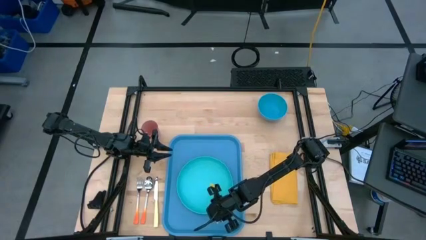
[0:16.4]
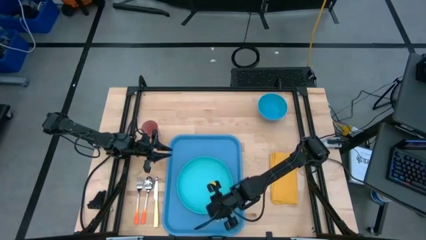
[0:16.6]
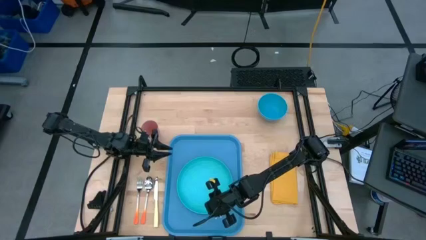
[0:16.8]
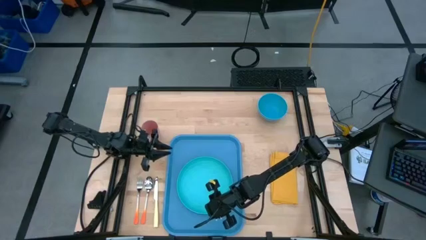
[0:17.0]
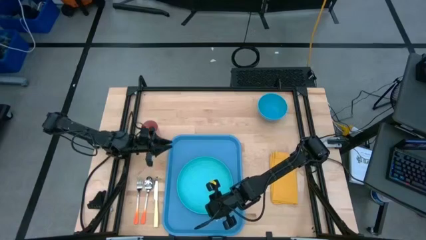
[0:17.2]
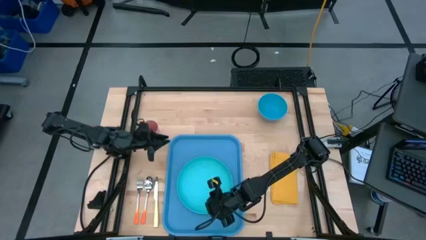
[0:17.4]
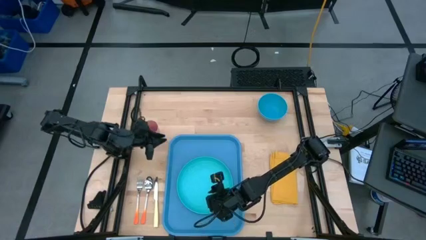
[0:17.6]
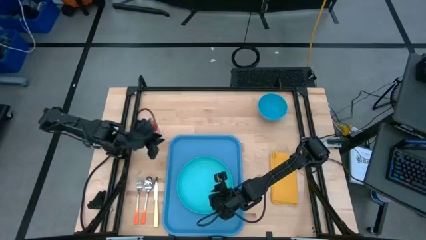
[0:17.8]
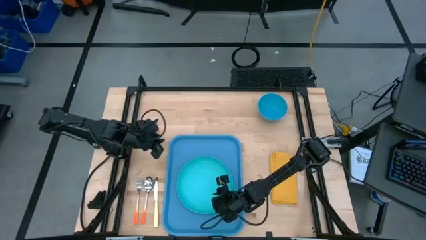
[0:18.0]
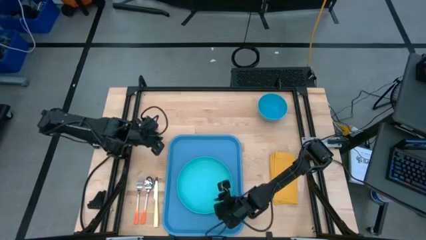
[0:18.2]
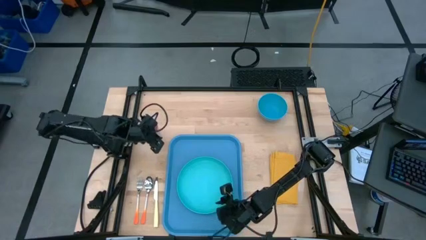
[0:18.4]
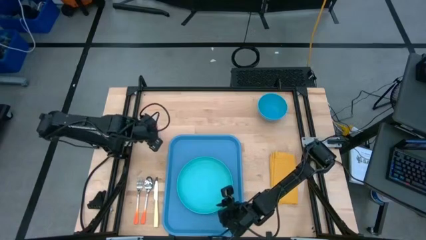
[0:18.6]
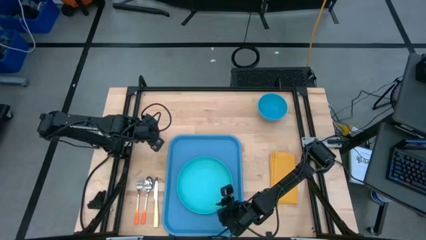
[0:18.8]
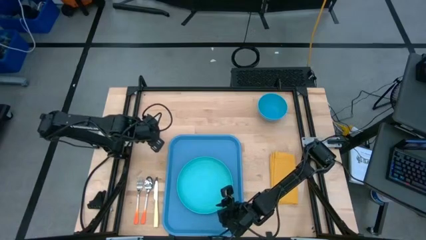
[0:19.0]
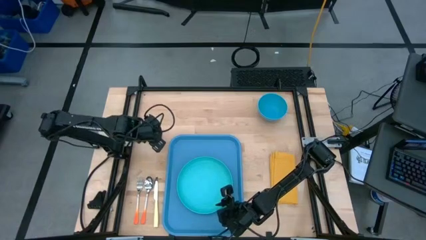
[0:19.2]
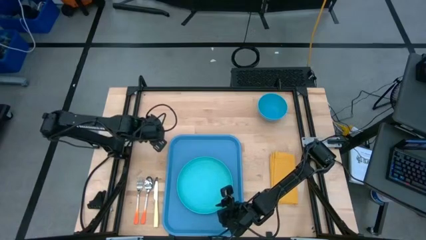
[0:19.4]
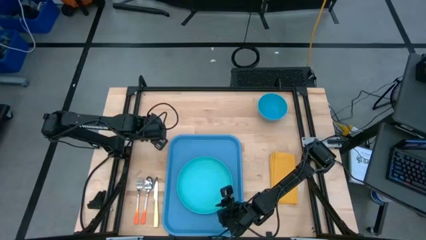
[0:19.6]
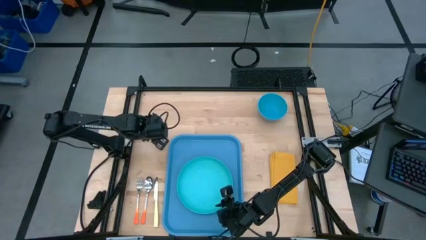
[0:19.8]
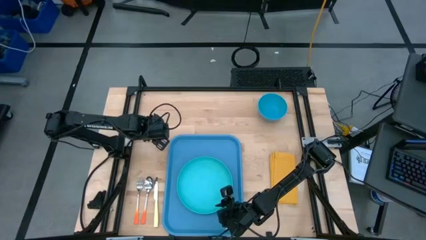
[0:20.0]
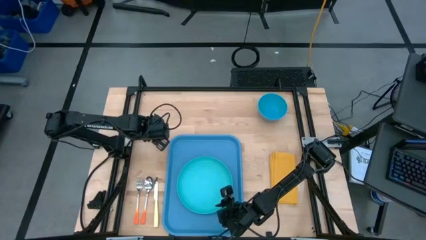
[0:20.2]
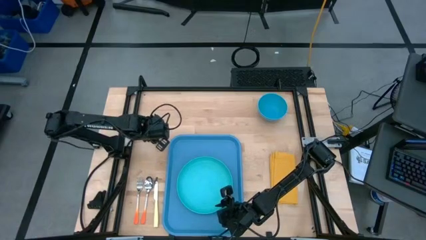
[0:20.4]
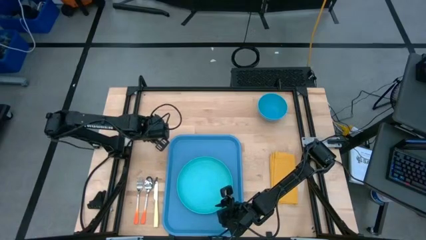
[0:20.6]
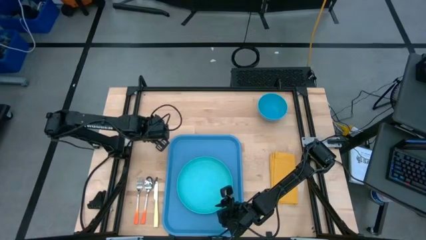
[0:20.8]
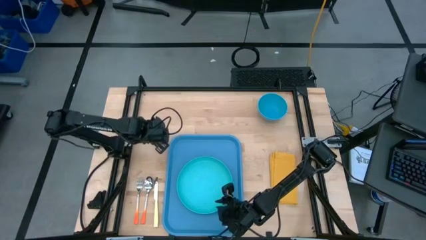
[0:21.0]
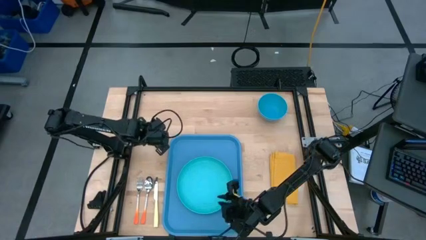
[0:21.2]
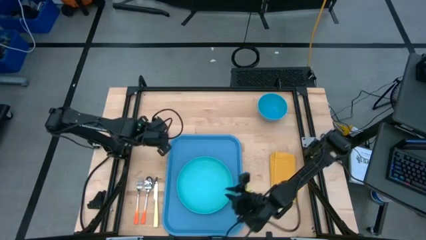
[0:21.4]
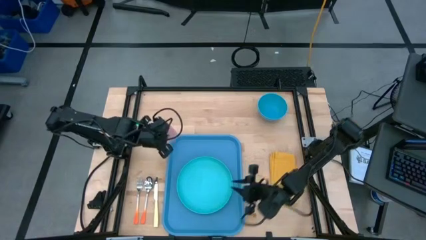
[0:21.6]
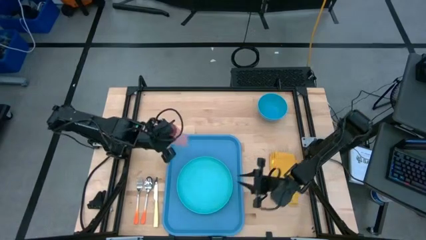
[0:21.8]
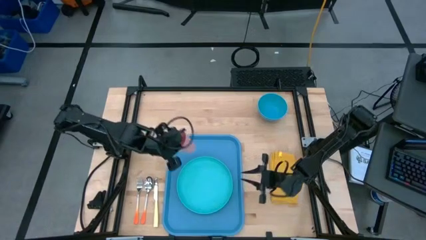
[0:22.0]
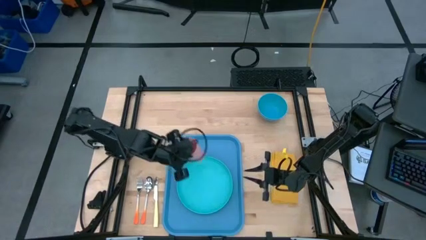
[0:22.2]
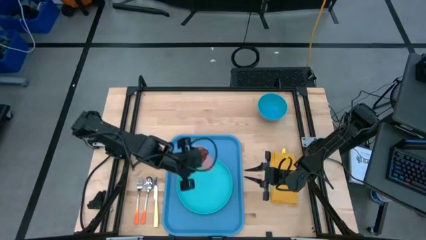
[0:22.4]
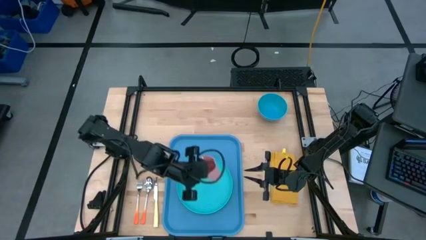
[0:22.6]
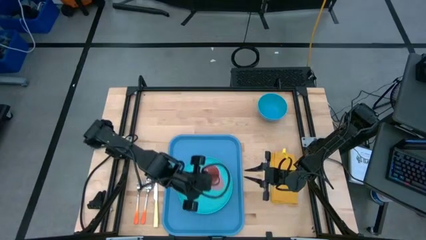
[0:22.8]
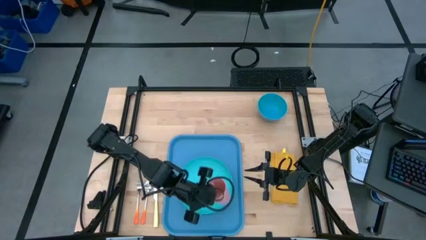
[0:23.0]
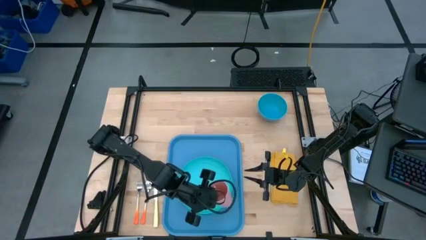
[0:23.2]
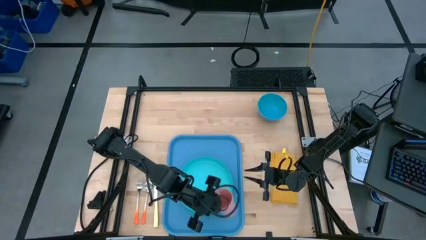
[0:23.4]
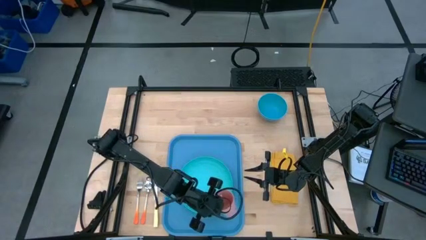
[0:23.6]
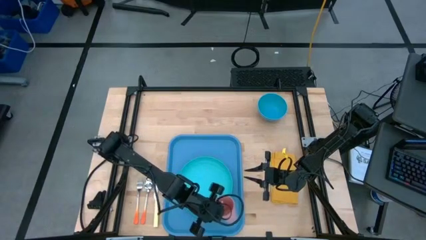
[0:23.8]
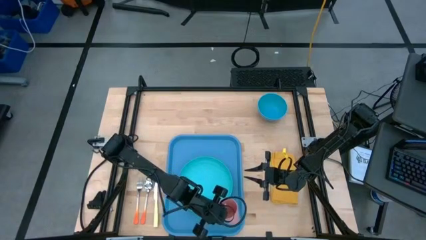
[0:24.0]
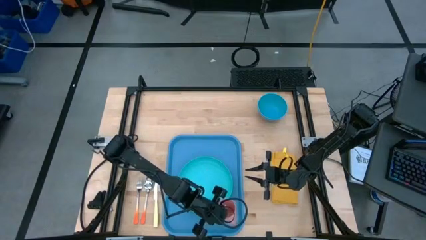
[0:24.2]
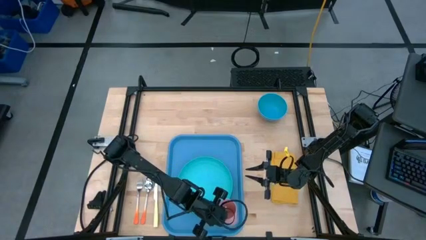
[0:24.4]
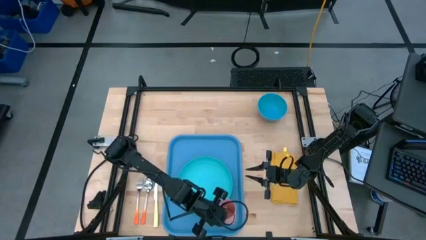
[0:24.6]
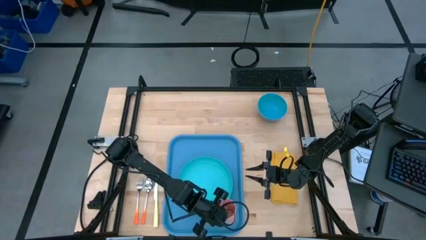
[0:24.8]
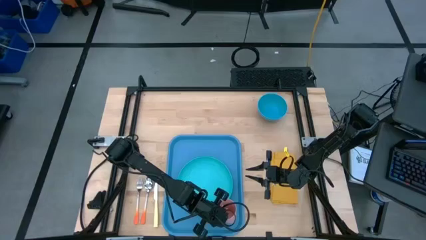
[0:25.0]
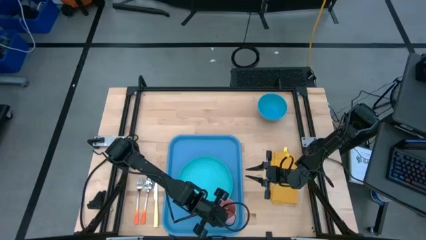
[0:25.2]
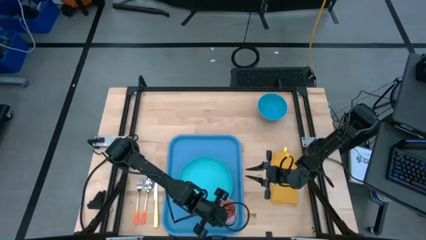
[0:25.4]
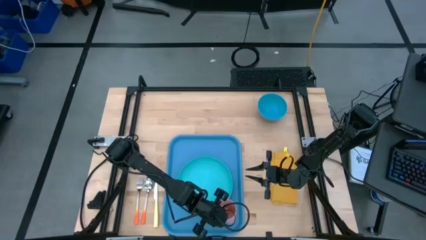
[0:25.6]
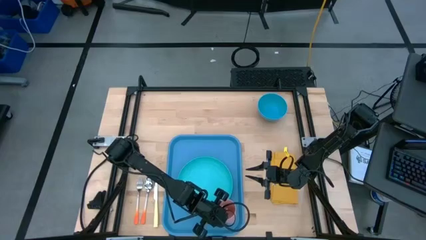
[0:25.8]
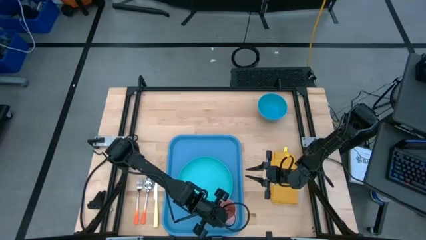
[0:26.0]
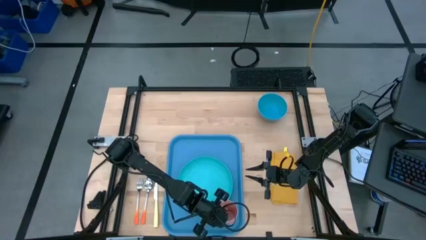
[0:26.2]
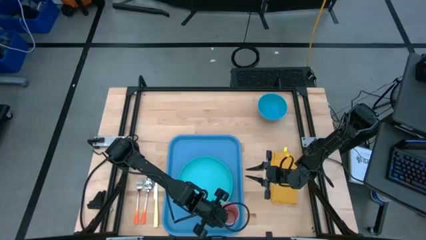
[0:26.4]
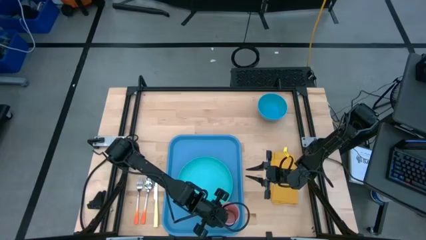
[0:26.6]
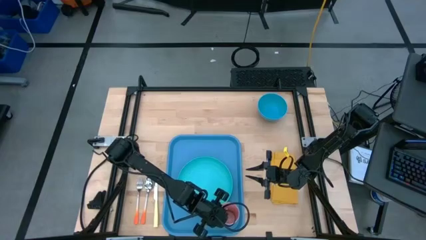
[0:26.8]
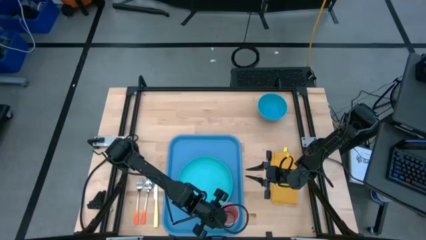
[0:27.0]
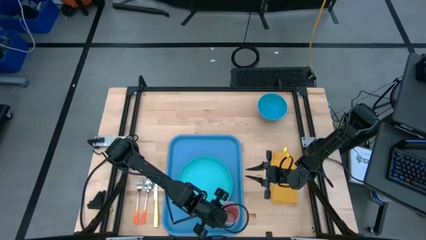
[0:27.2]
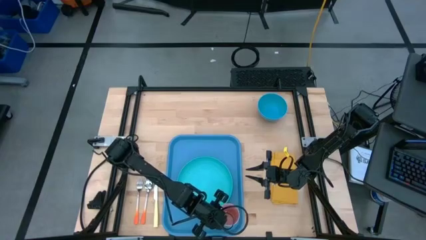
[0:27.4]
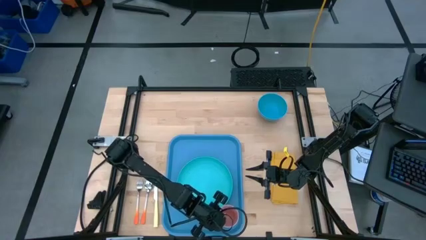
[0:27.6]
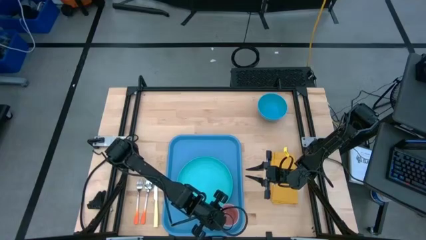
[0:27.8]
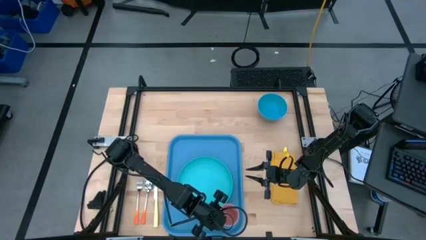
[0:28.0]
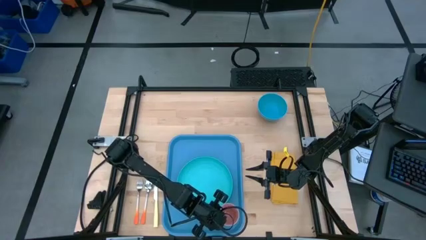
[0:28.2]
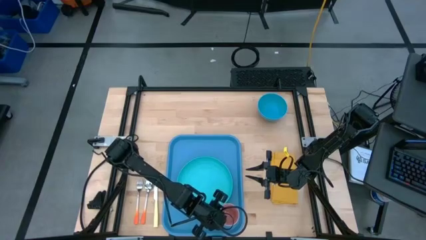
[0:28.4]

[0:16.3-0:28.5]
Task: Set up tray
Put the pink cup to the top right of the blue plate on the blue serving tray

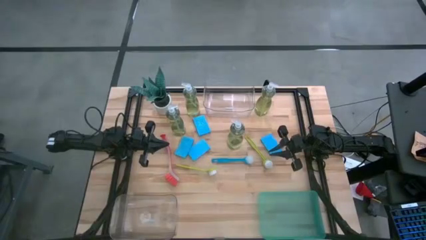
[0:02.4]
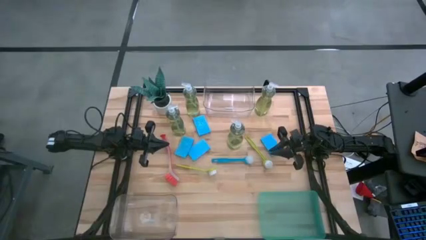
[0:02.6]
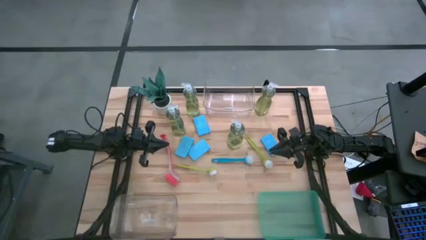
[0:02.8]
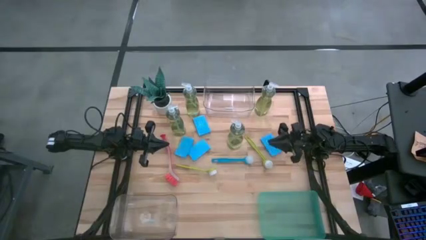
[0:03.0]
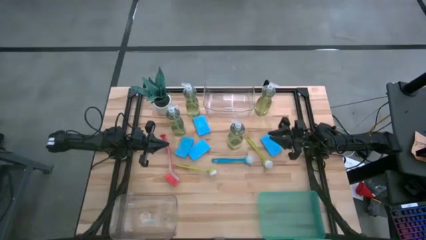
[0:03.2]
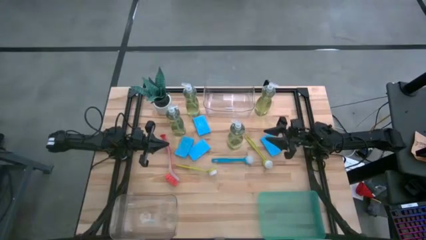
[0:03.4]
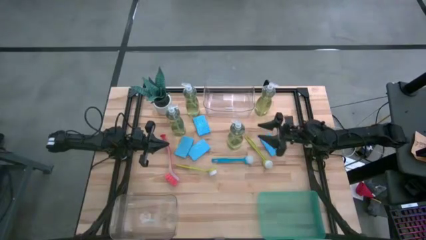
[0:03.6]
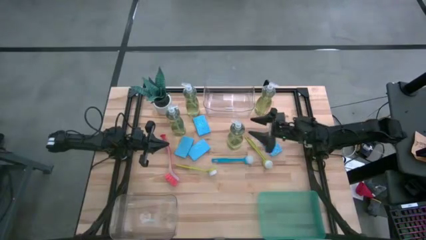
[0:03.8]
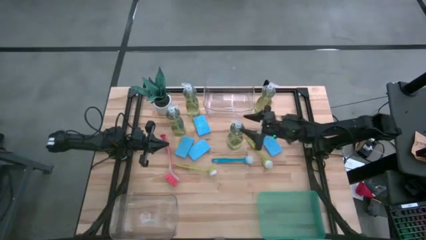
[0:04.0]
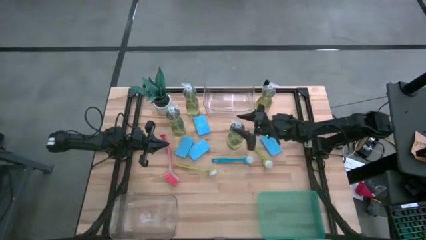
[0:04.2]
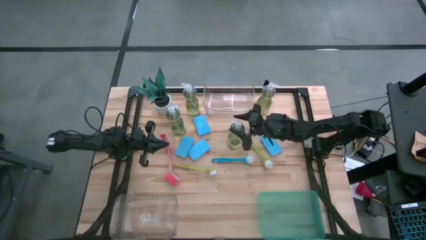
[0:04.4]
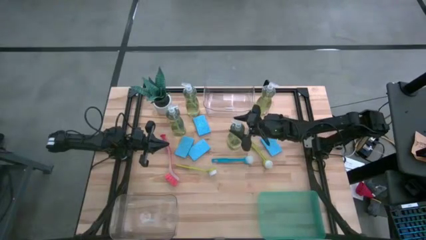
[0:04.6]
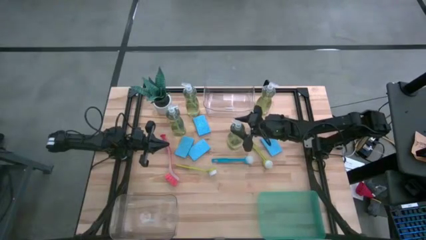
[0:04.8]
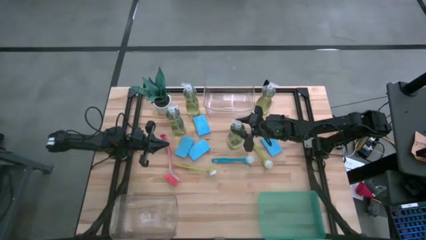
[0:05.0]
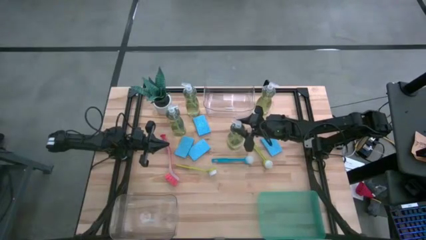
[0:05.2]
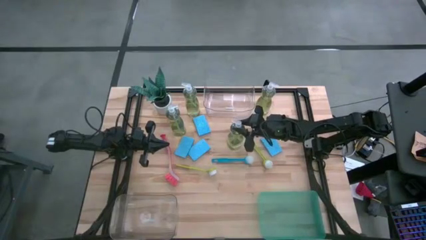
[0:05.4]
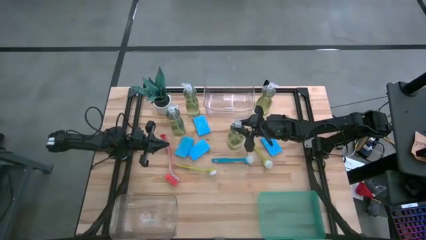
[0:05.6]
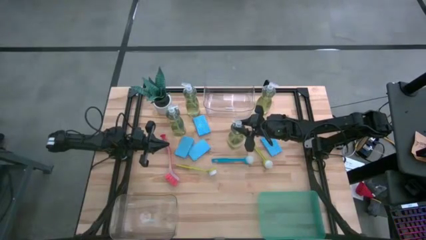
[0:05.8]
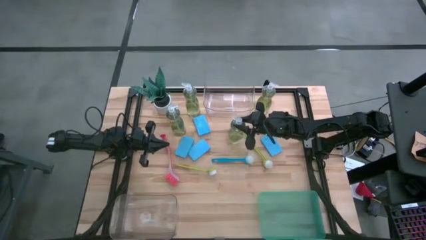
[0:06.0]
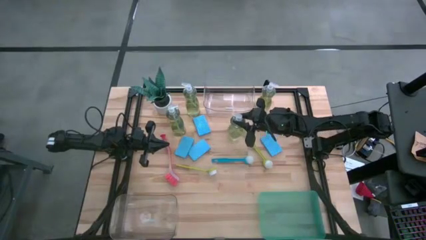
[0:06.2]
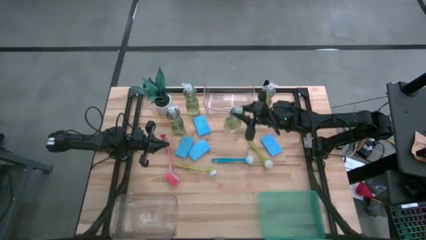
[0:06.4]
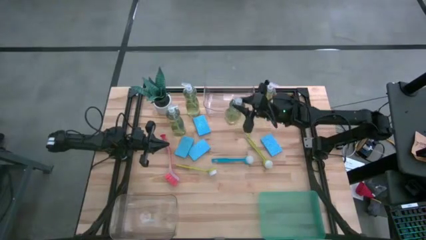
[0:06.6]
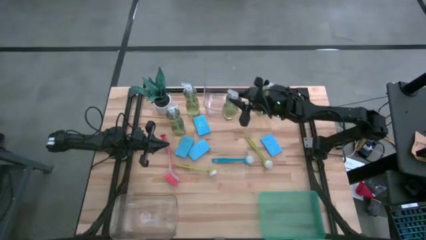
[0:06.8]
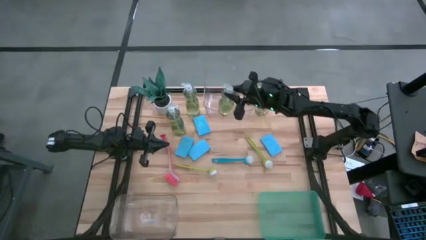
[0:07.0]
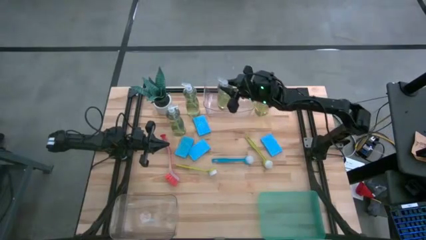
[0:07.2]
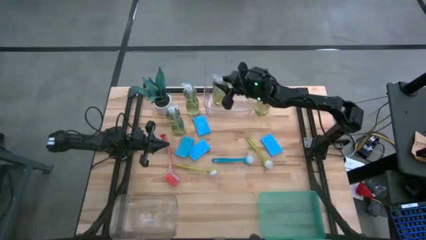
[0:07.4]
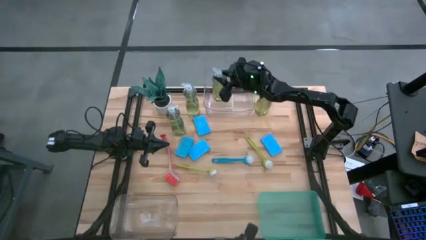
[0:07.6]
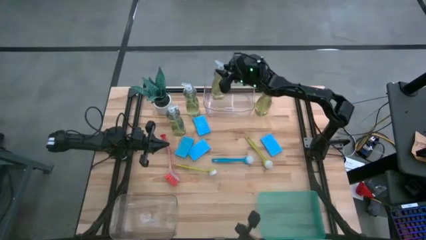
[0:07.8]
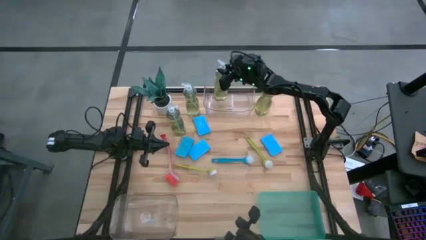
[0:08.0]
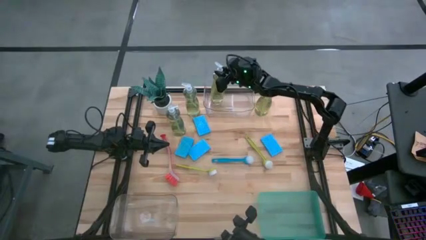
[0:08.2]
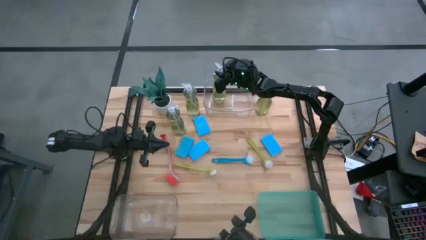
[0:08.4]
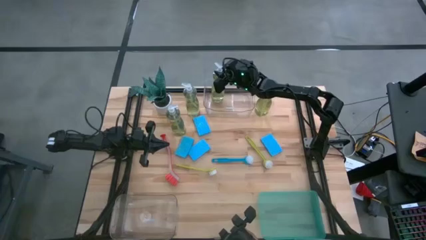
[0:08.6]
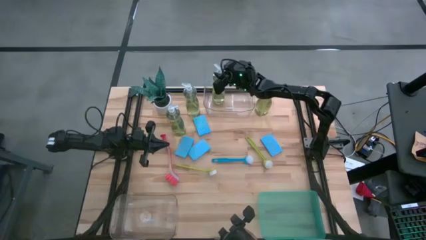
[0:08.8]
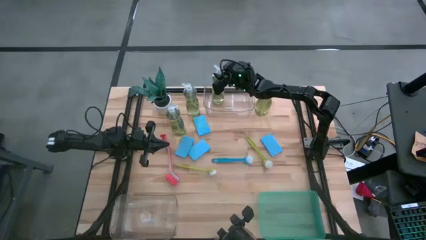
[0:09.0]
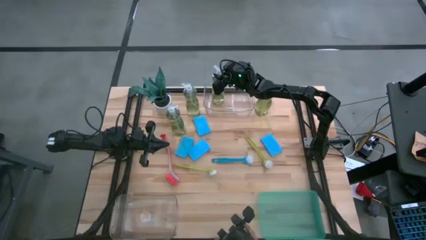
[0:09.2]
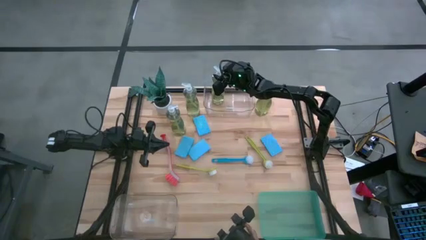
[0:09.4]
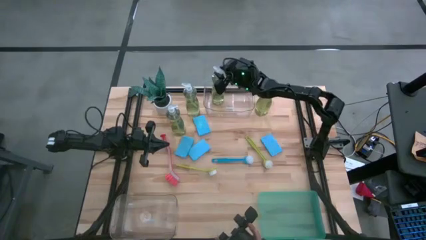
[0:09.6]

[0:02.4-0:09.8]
Task: Pick & Place Kitchen Sink Supplies
Put the liquid detergent into the top transparent bin
